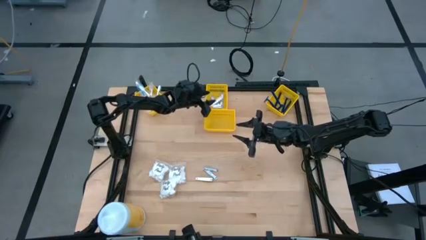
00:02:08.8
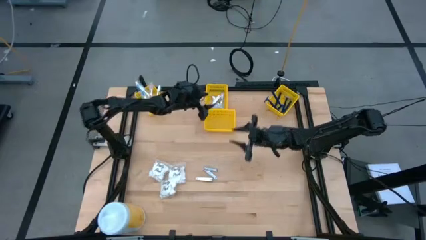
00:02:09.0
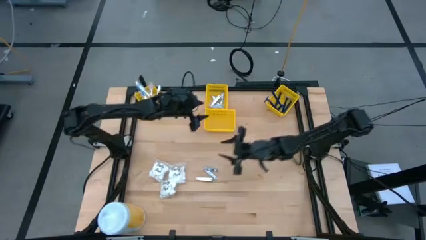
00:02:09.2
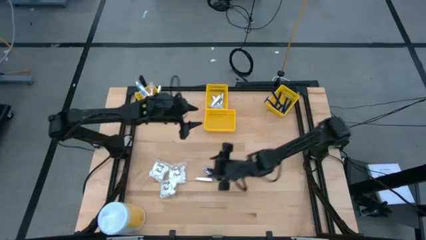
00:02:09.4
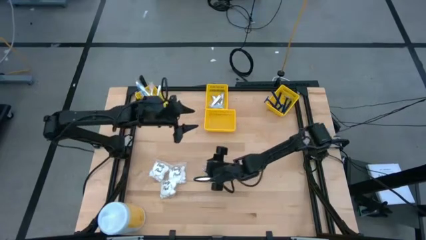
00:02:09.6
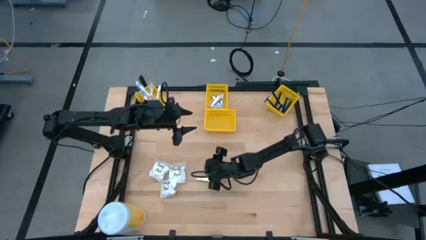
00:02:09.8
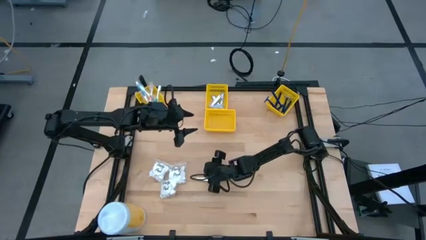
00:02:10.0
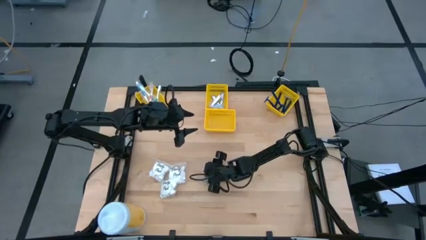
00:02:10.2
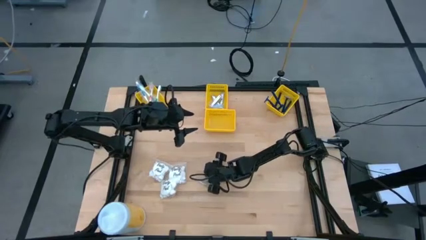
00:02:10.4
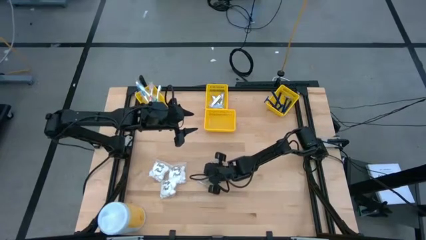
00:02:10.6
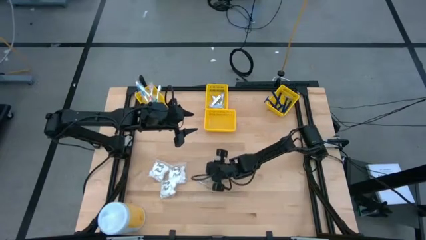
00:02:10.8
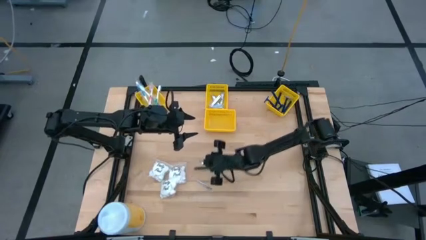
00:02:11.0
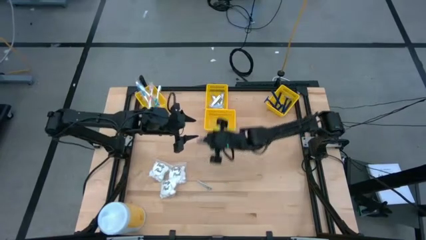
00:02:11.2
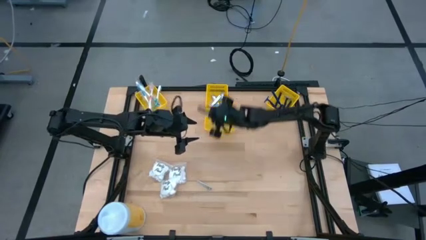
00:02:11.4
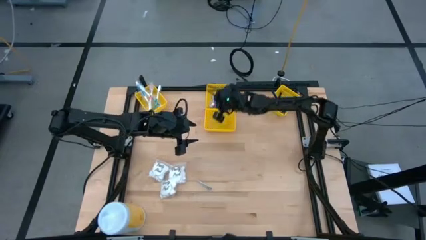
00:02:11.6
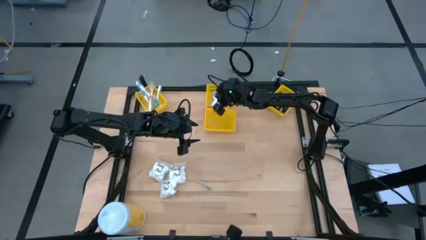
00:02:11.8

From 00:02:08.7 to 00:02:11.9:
Task: Pick & Place Travel size toiletries
Put the nail cutter into the top middle yellow bin

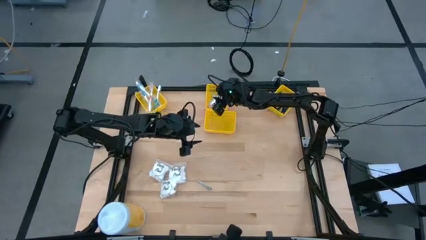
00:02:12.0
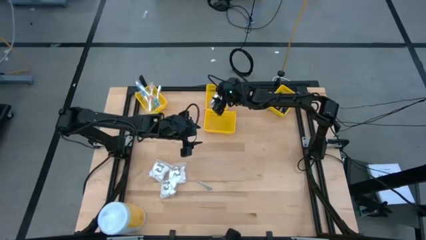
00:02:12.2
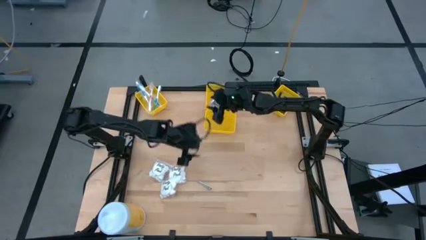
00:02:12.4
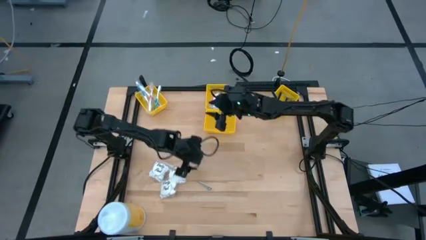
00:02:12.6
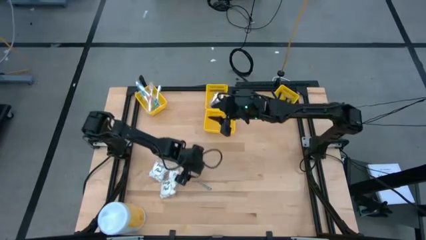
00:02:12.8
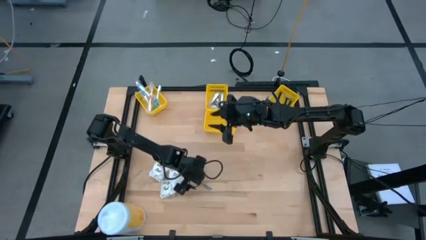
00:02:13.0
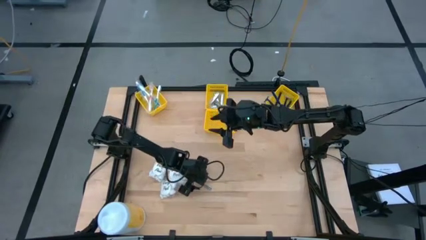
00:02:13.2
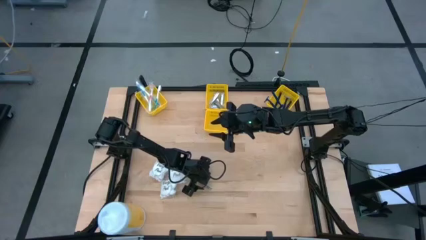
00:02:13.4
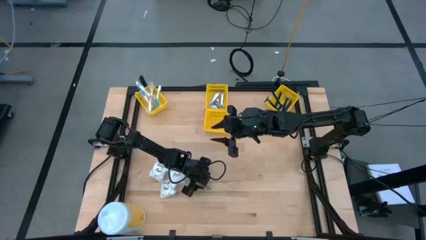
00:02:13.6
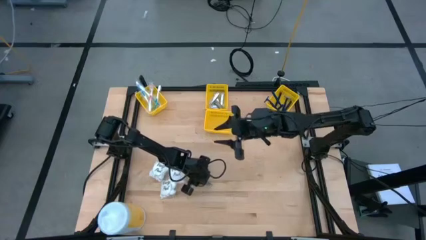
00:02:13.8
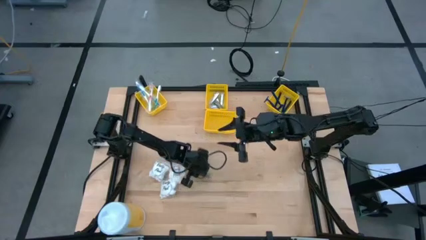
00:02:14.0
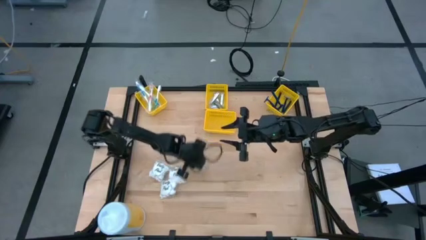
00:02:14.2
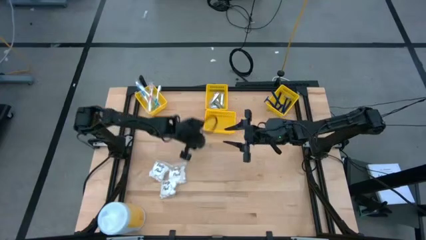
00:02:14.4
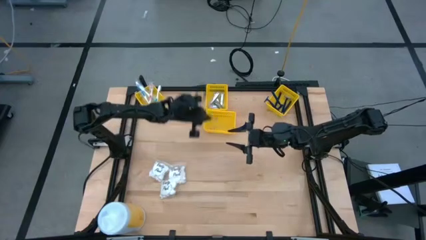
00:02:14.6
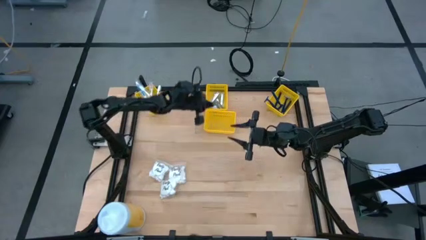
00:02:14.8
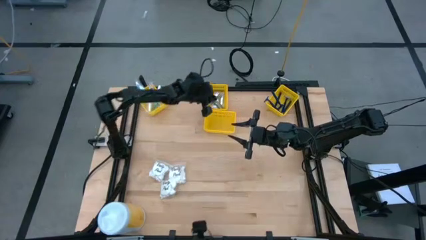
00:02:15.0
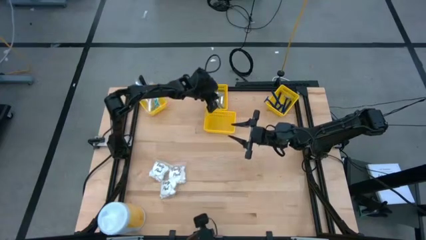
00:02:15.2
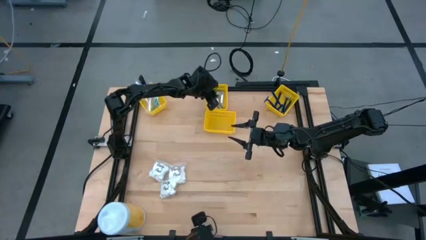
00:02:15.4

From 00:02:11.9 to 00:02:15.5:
Put the nail cutter into the top middle yellow bin

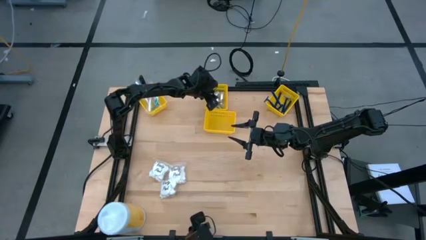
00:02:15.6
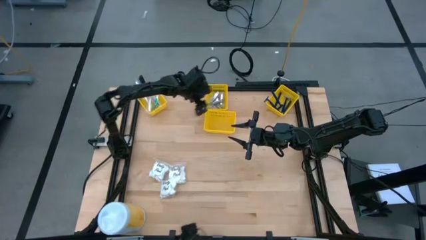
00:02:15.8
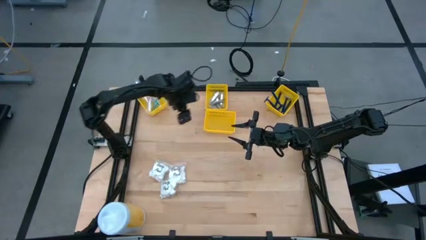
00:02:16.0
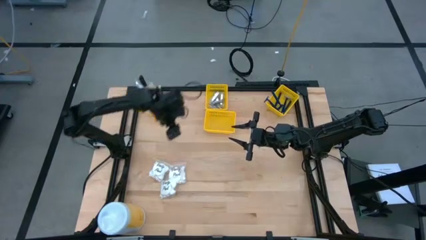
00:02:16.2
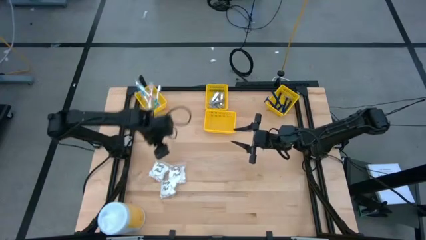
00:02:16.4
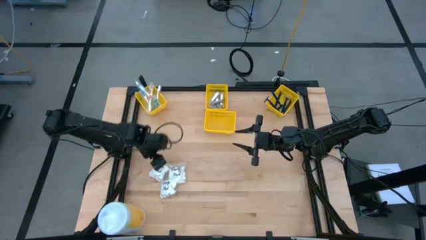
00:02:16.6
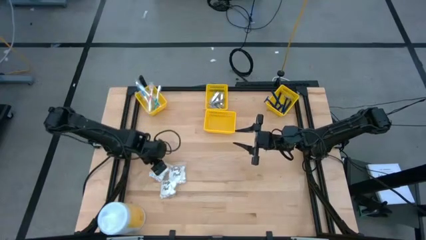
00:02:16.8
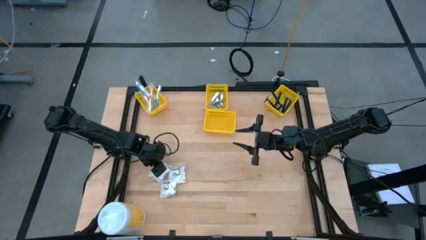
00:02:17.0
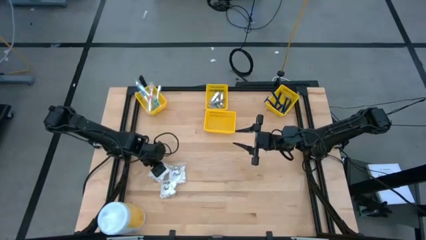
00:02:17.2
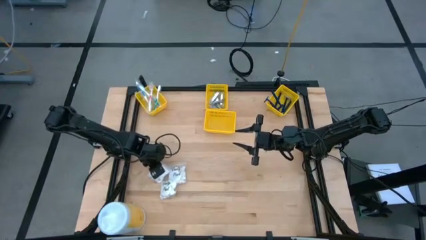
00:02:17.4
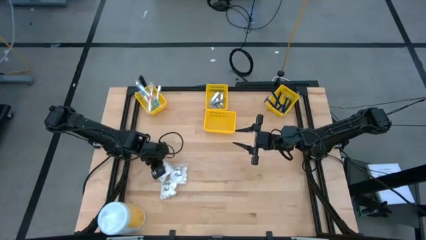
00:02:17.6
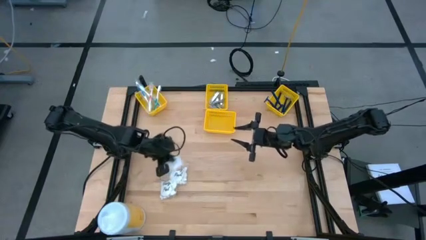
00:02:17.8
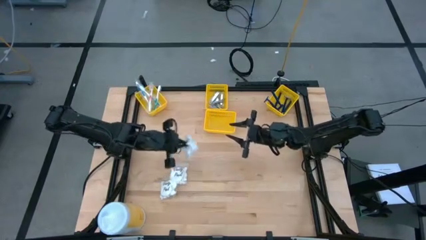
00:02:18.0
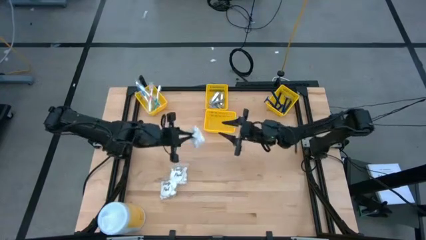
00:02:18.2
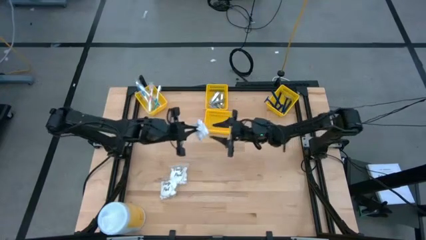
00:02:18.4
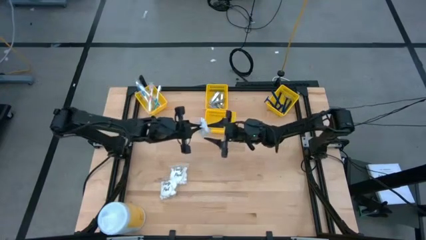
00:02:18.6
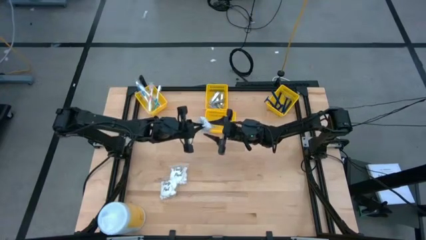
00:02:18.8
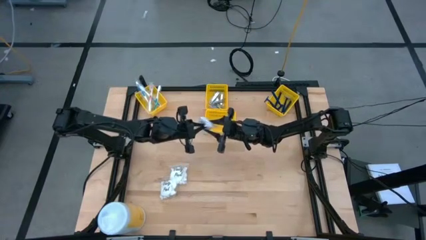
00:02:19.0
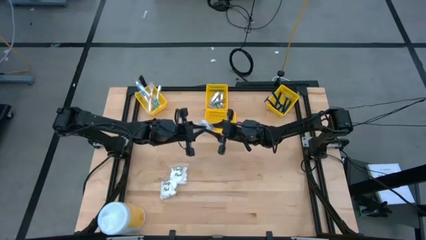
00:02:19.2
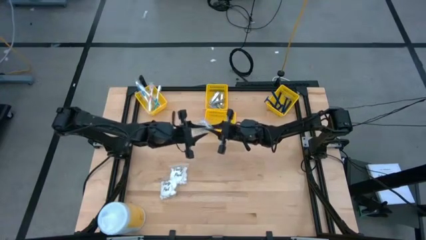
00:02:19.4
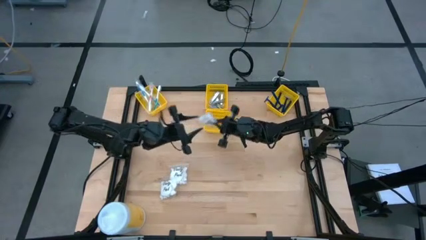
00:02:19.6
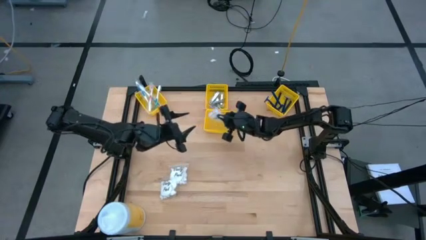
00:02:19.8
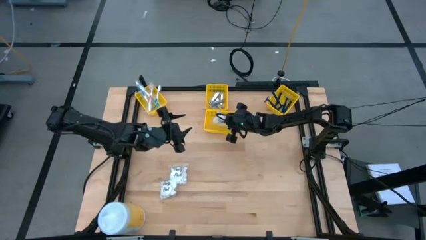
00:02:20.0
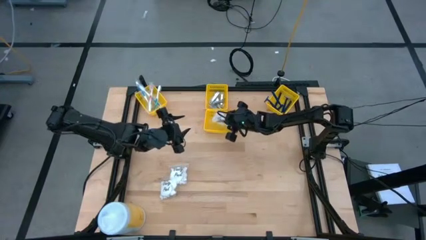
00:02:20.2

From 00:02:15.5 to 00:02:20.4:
Put the cotton pack into the bottom middle yellow bin

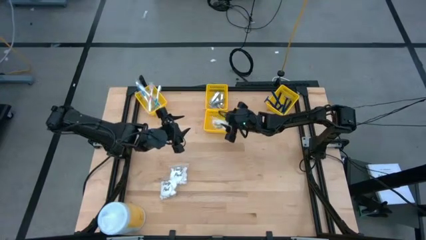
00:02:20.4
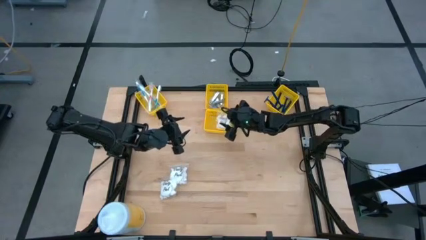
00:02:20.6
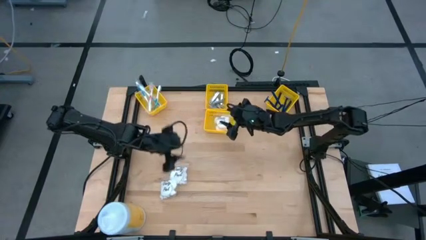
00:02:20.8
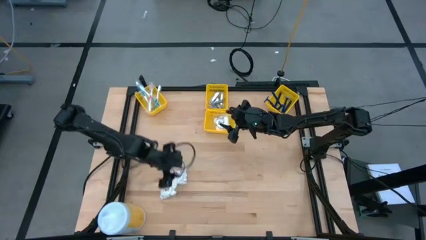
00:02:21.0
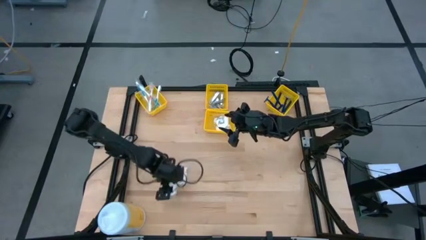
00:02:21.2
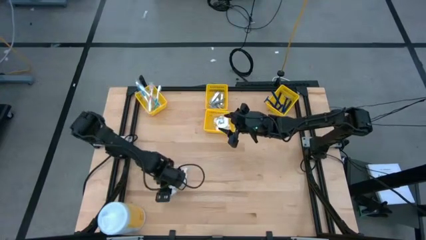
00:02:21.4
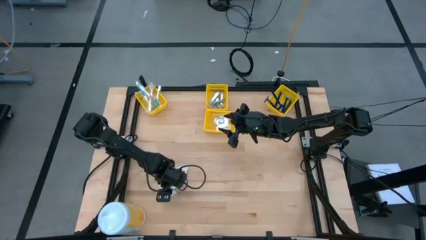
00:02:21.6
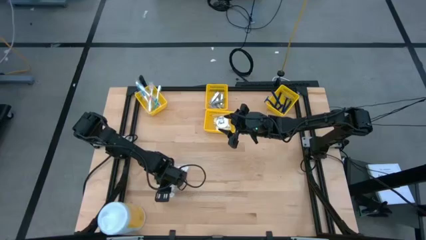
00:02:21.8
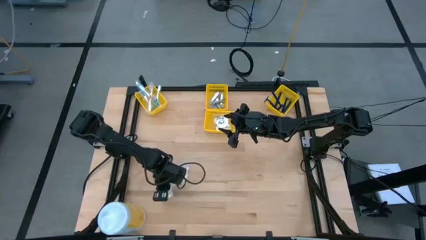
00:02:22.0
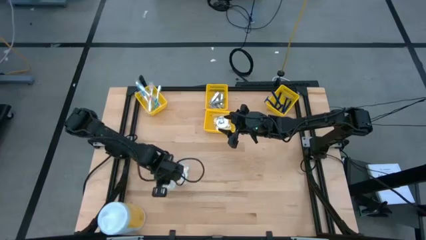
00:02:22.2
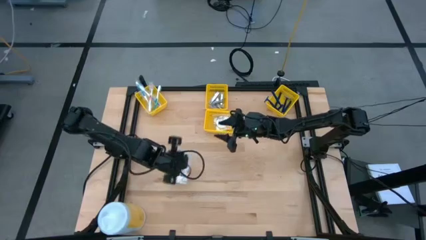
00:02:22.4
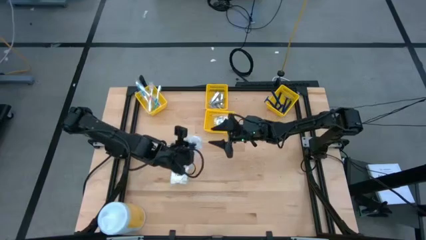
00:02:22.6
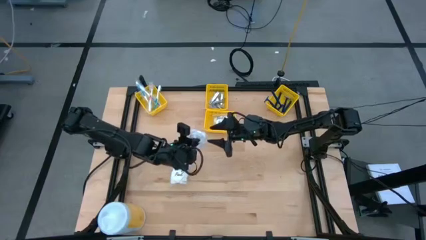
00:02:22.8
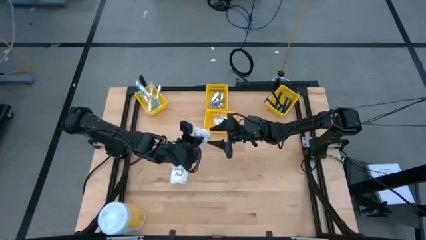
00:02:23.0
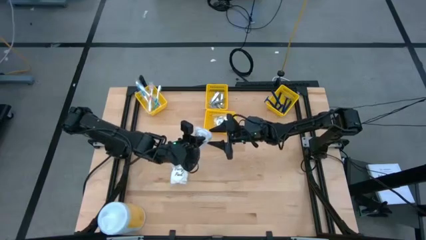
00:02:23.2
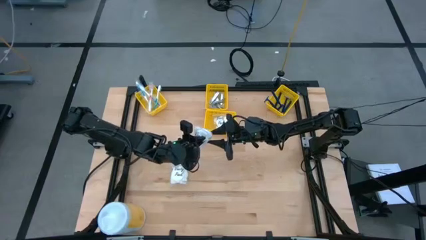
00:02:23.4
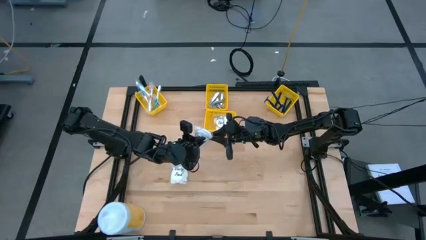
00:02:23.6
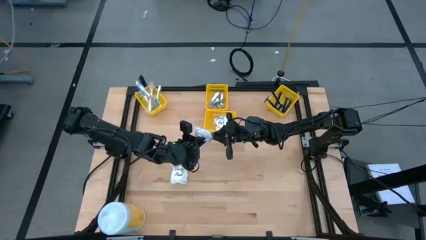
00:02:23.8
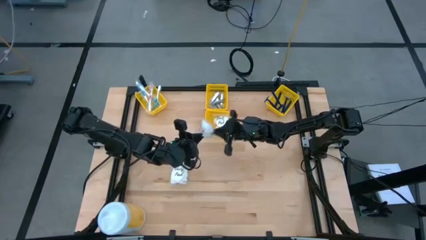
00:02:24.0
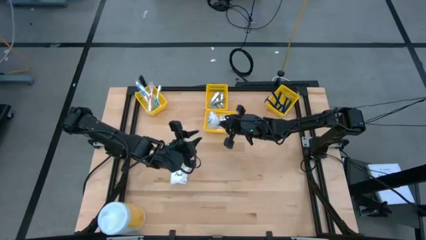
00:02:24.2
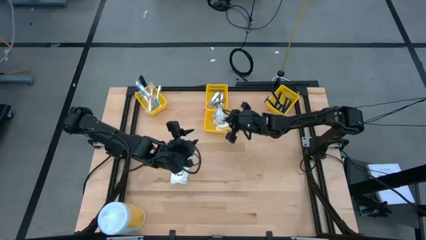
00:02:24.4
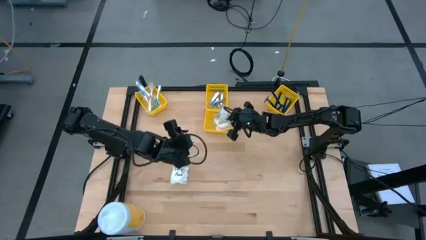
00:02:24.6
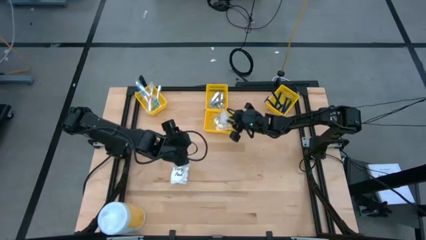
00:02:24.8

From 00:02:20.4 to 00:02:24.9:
Put the cotton pack into the bottom middle yellow bin
